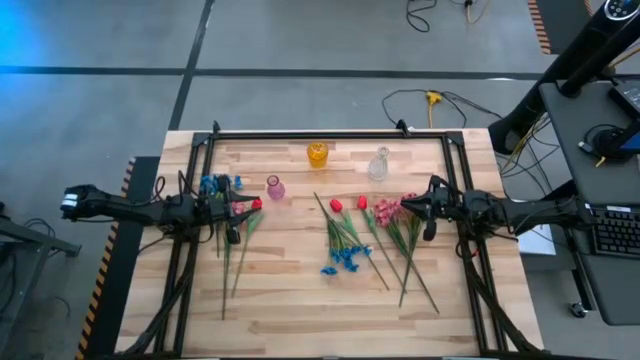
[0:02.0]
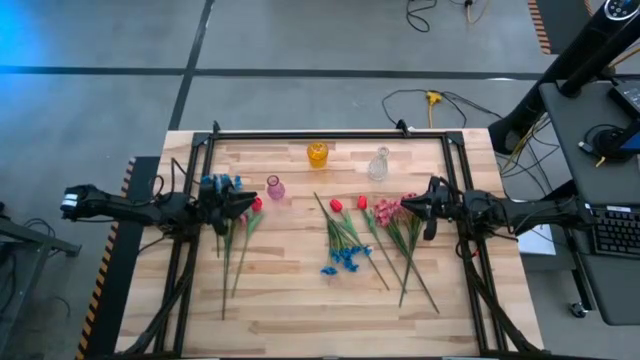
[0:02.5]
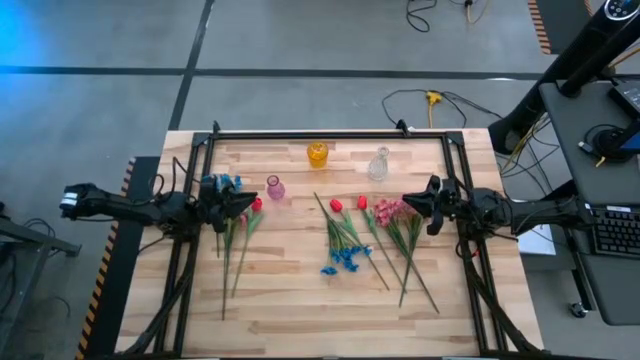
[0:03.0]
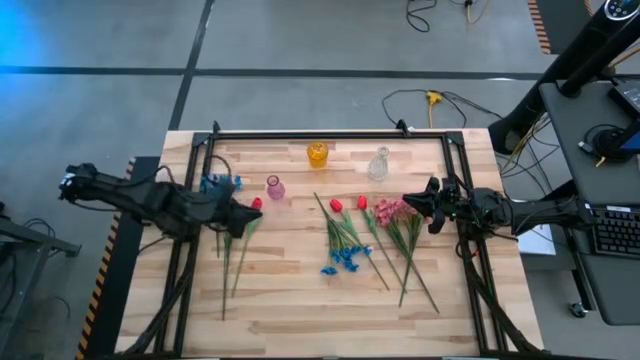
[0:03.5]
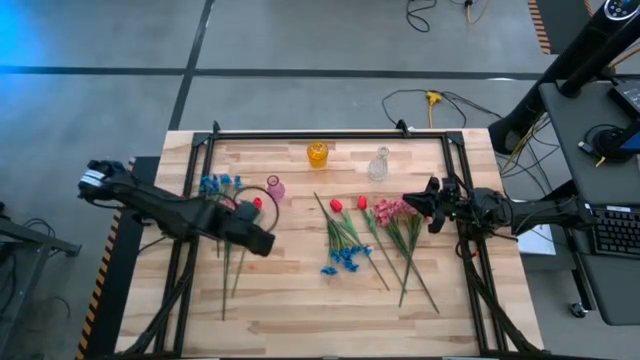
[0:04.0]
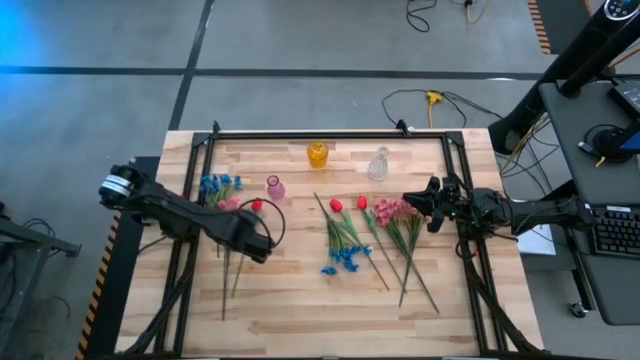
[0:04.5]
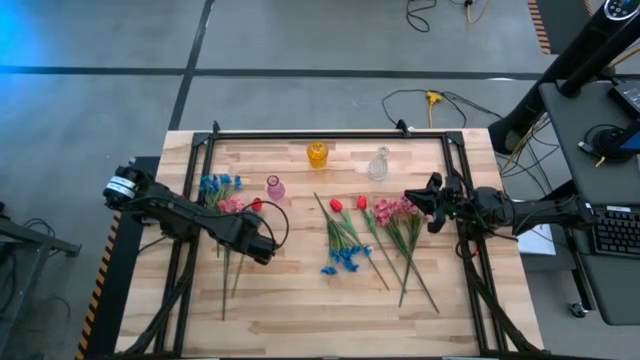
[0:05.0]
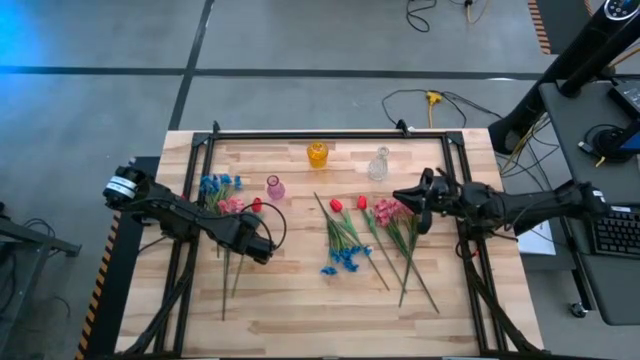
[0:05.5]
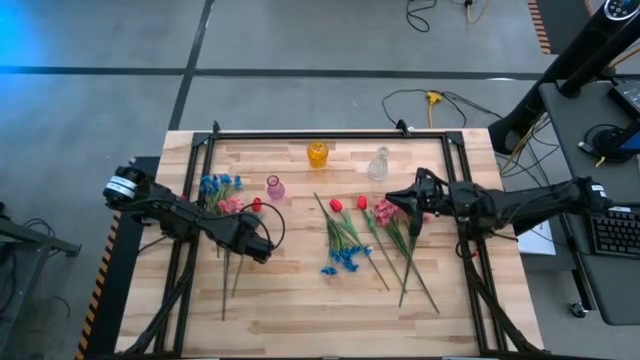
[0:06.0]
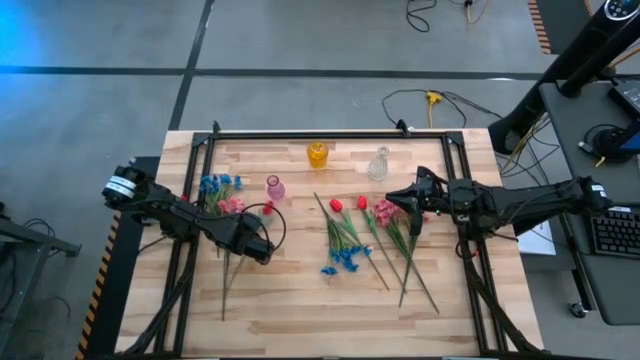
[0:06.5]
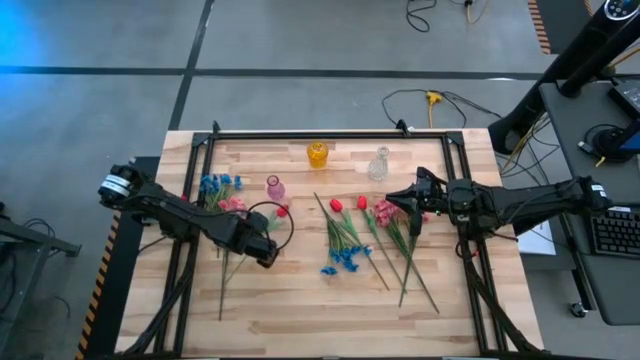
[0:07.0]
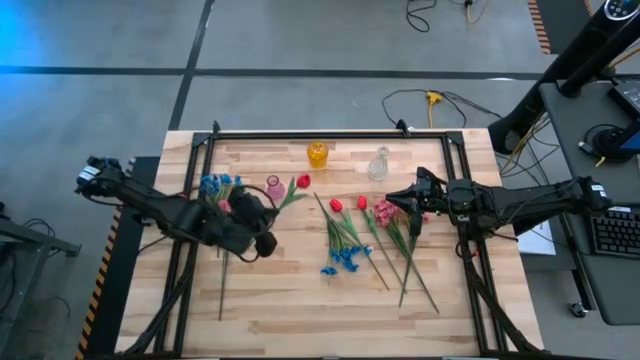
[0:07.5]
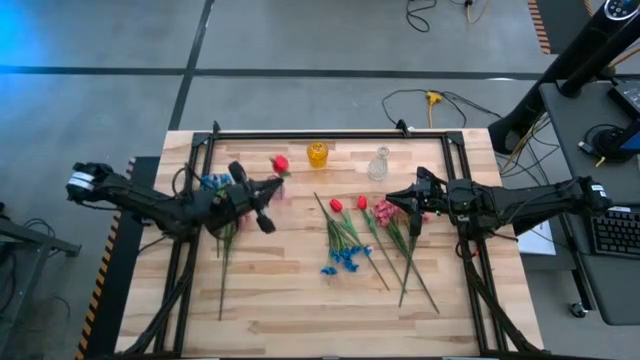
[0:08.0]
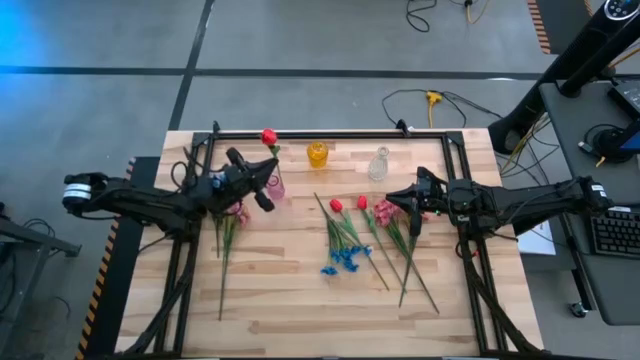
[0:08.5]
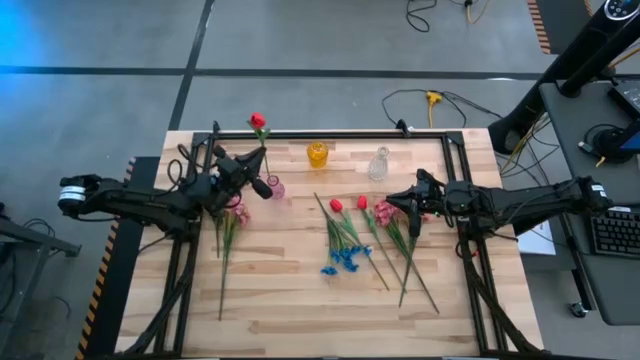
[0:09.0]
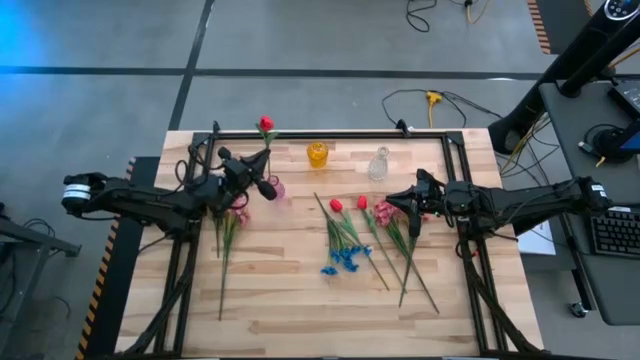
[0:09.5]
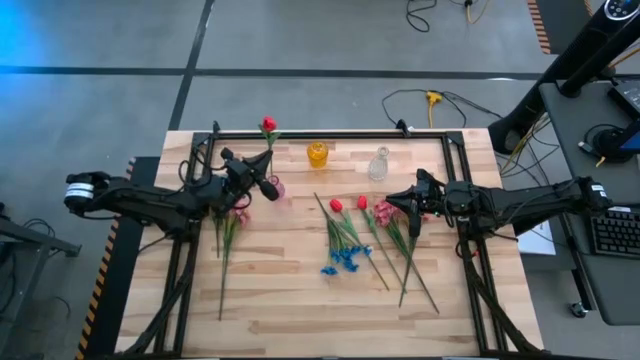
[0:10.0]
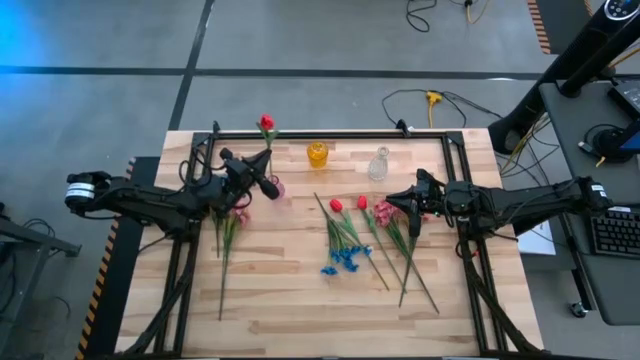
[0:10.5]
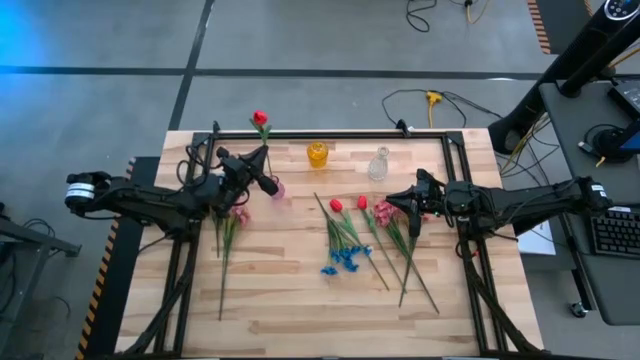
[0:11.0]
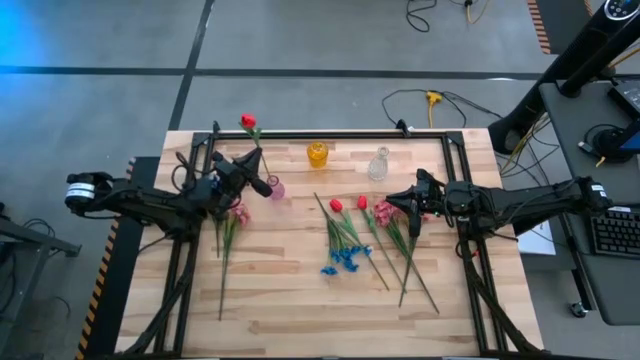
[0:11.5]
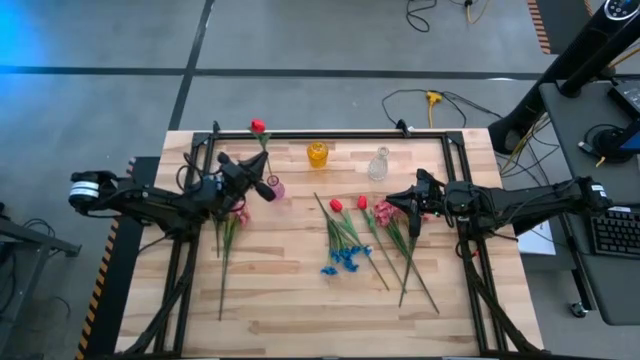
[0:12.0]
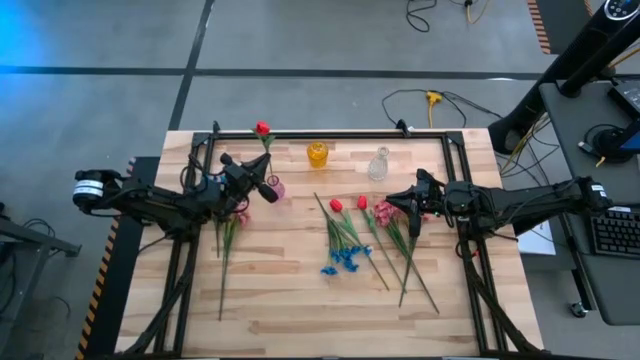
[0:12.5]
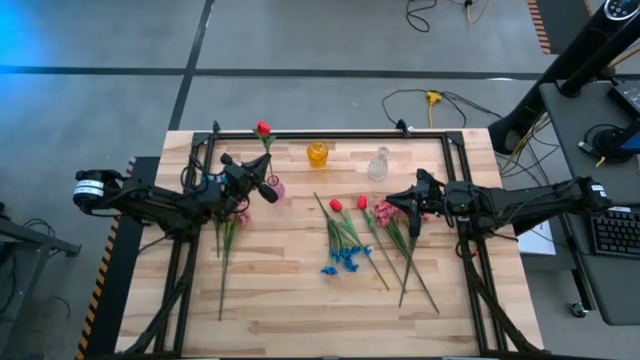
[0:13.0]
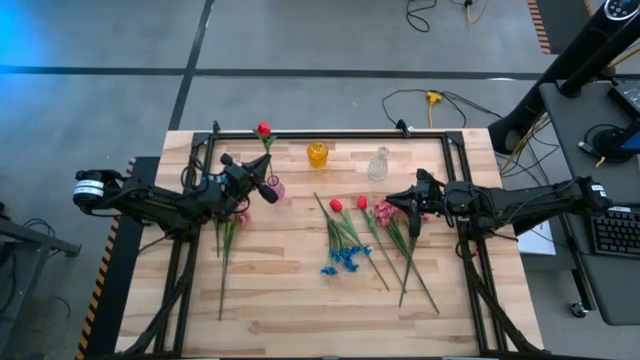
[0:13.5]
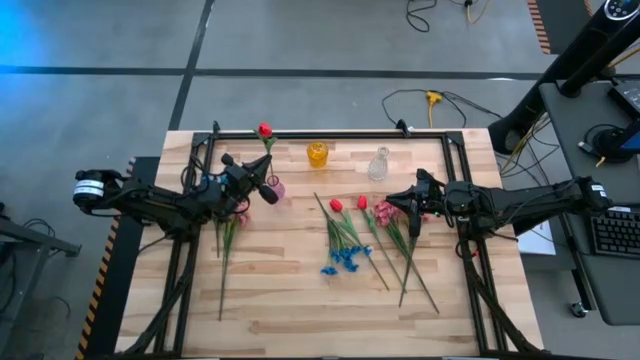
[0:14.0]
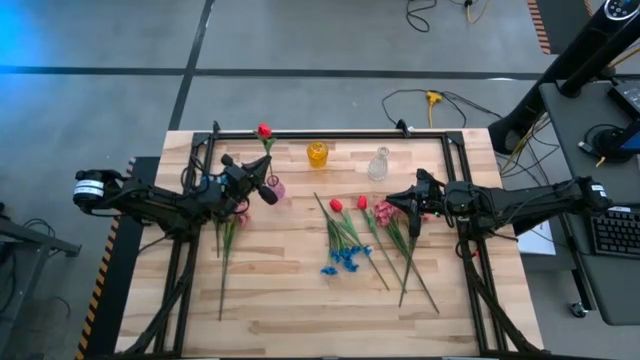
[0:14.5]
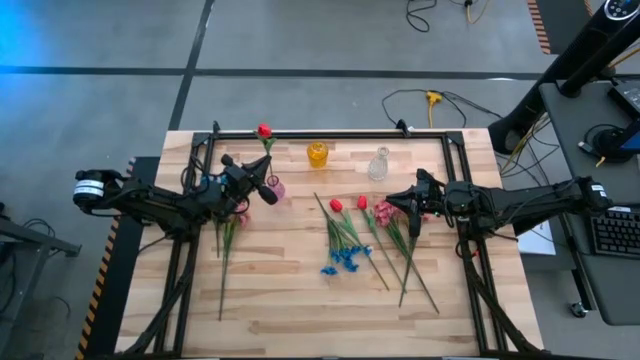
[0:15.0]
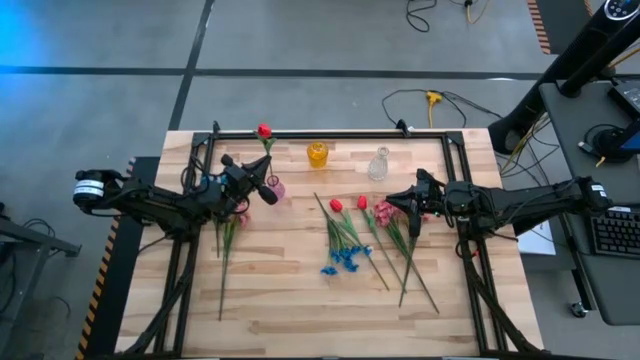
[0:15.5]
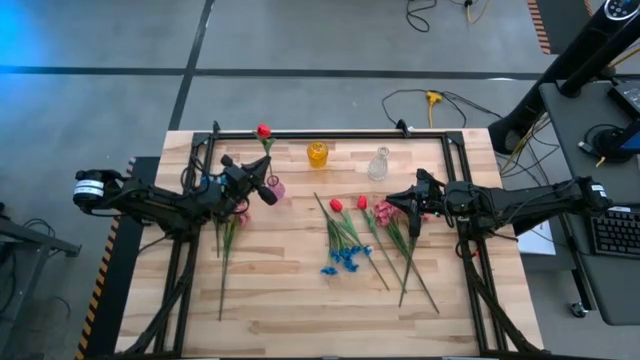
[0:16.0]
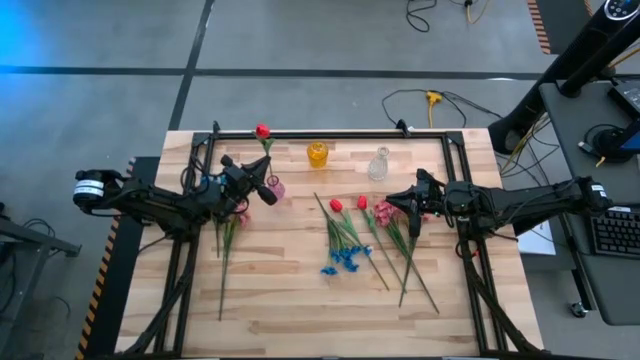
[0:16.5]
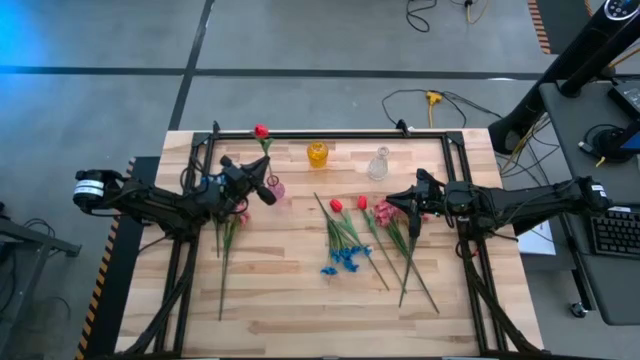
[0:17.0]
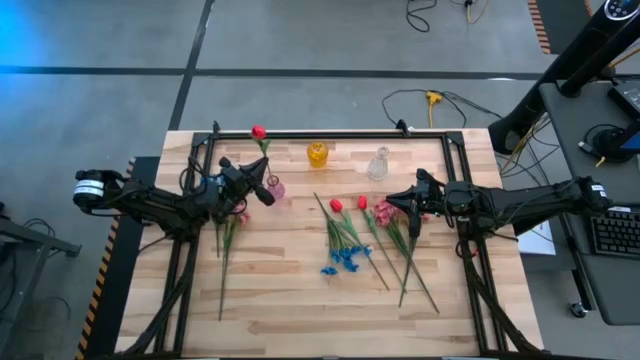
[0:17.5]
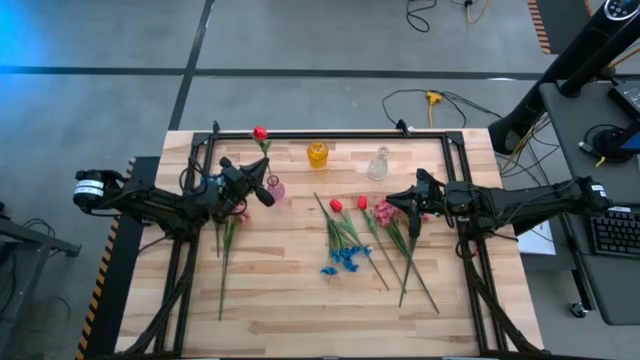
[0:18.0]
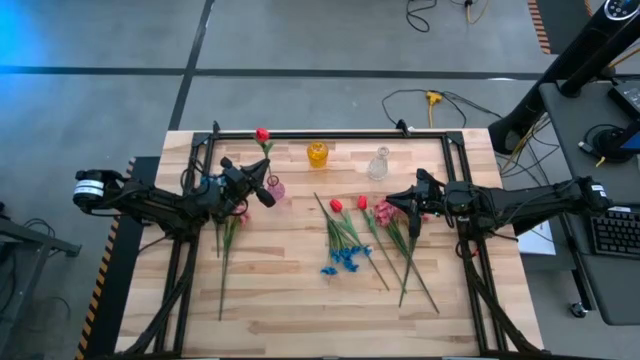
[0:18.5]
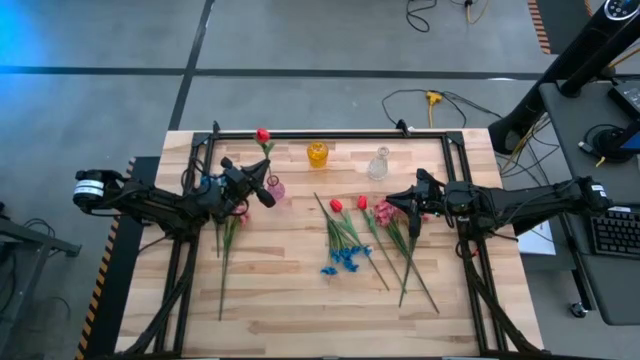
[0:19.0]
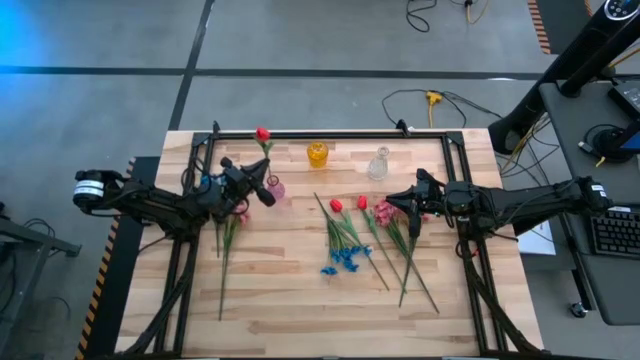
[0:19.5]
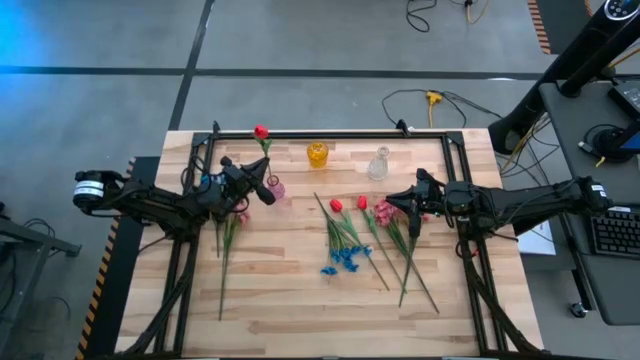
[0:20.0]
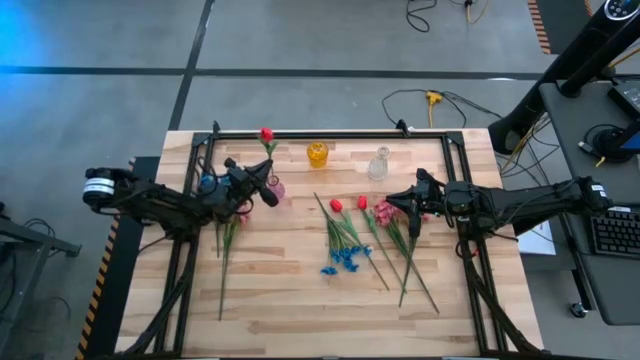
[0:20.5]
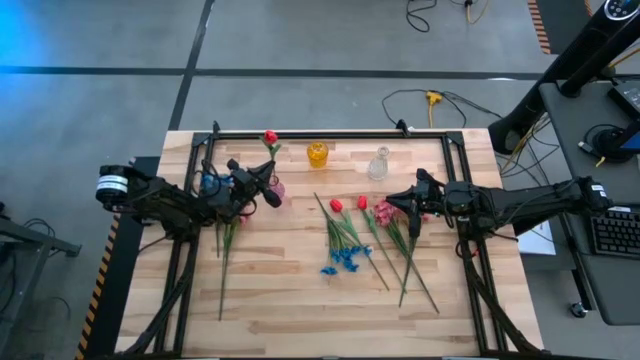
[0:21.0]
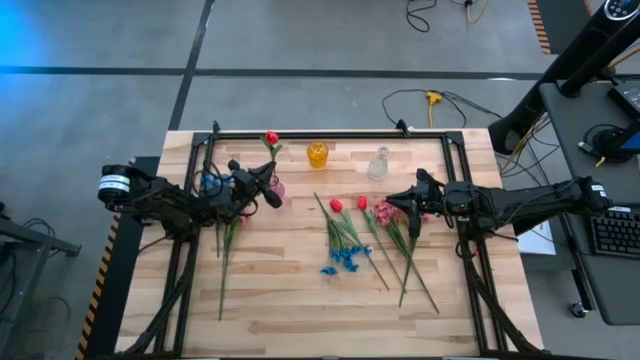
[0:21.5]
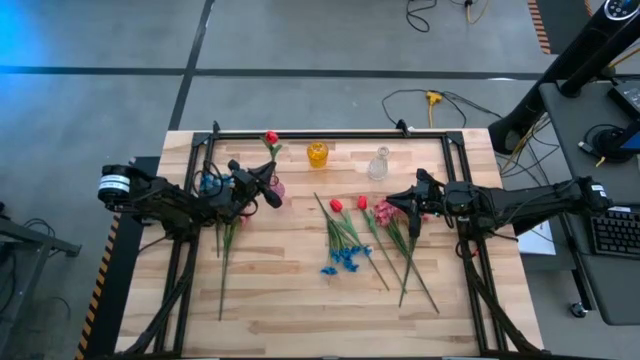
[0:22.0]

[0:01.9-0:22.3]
Task: Sort flowers into vase by color
Put the left red flower into the violet vase
